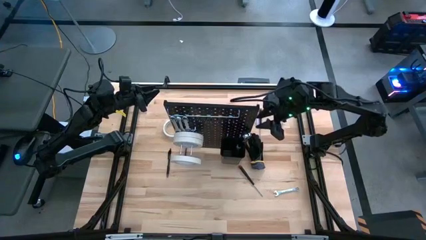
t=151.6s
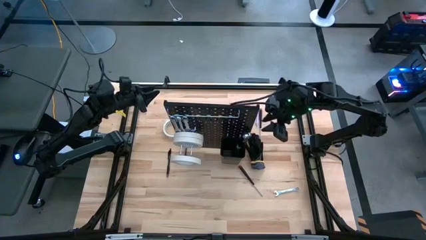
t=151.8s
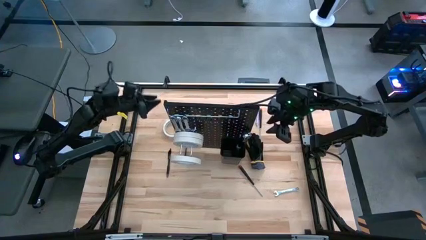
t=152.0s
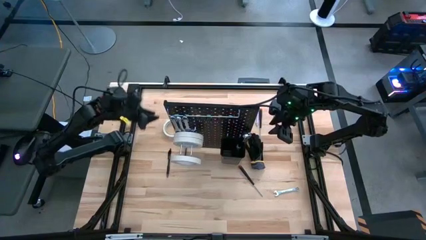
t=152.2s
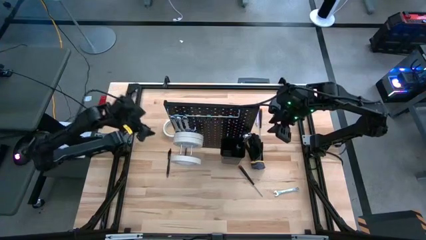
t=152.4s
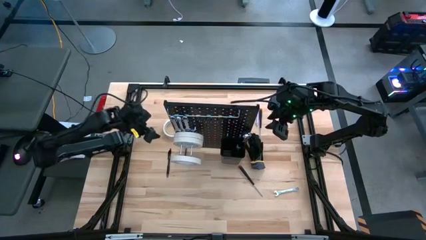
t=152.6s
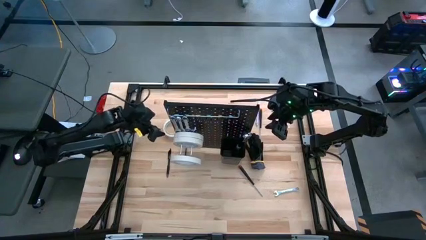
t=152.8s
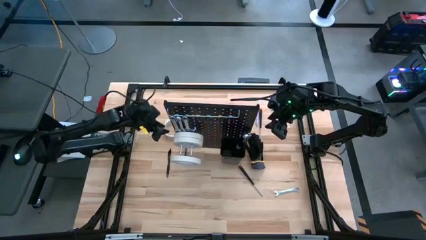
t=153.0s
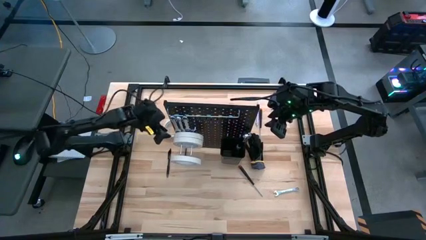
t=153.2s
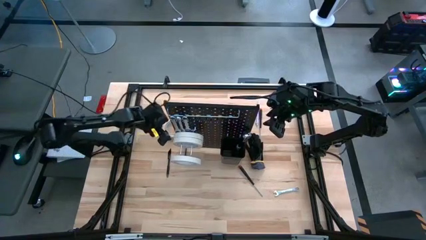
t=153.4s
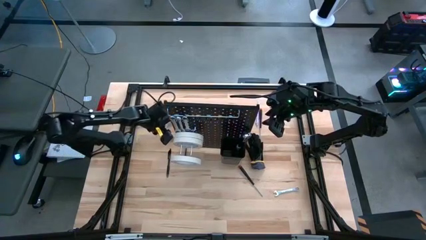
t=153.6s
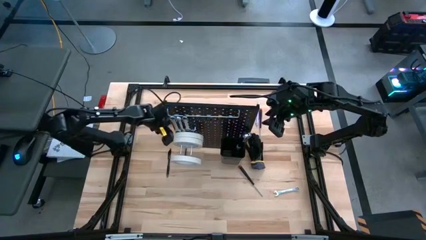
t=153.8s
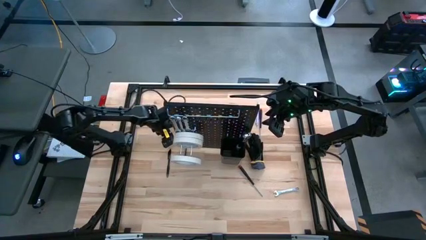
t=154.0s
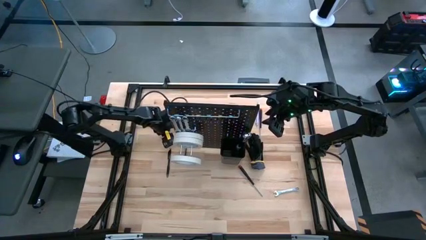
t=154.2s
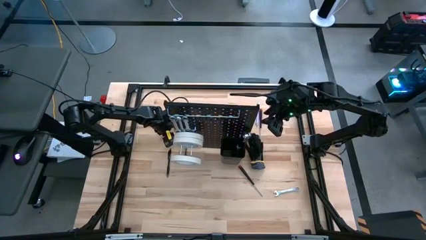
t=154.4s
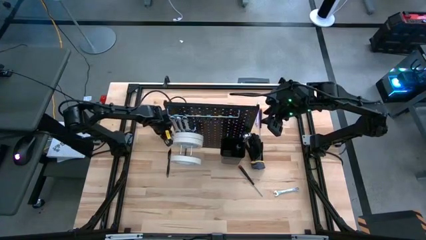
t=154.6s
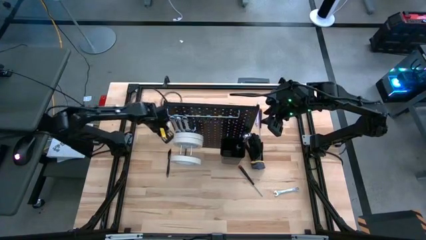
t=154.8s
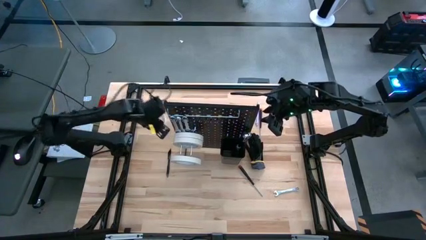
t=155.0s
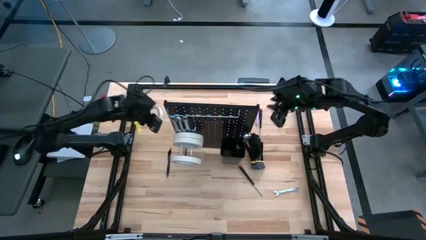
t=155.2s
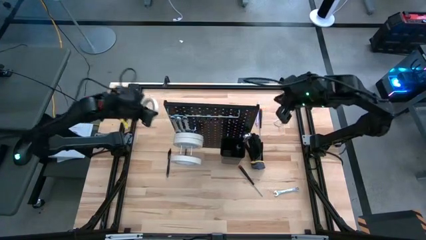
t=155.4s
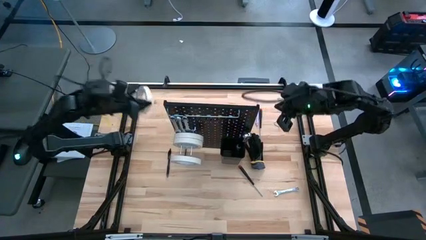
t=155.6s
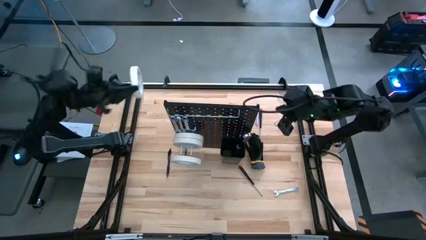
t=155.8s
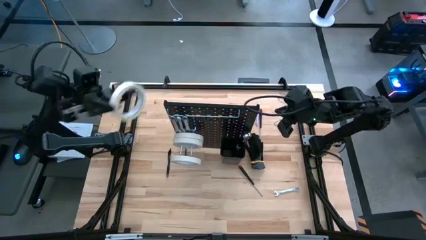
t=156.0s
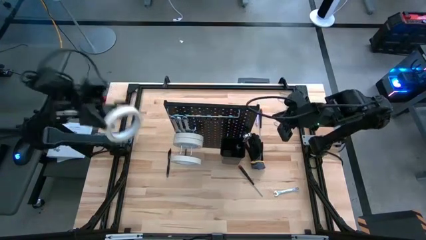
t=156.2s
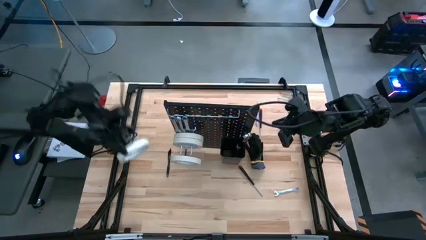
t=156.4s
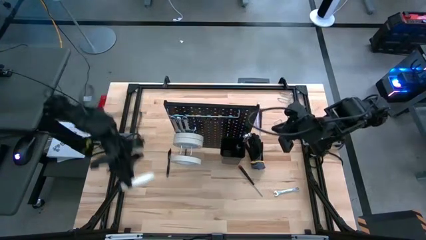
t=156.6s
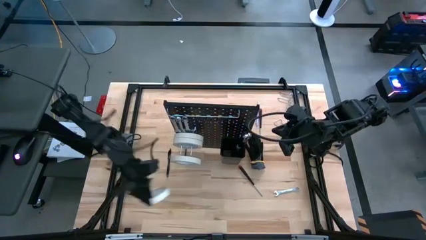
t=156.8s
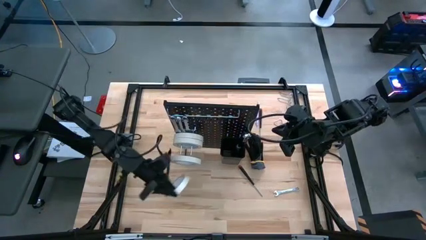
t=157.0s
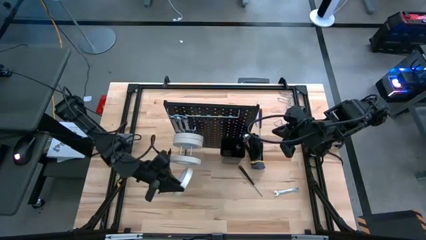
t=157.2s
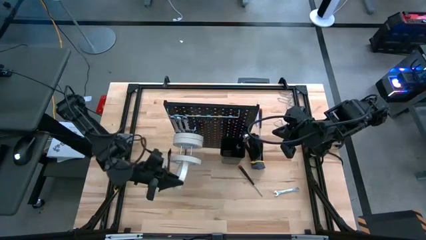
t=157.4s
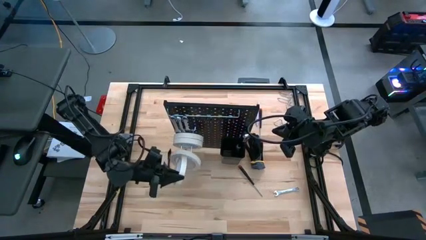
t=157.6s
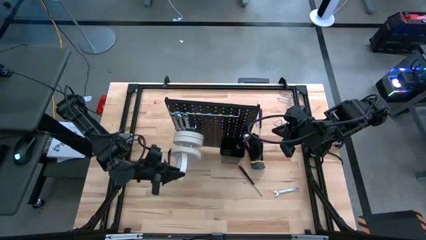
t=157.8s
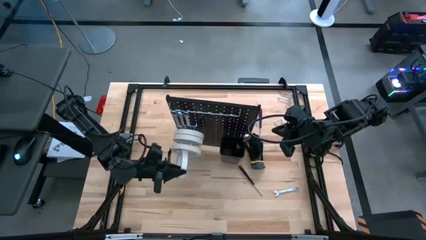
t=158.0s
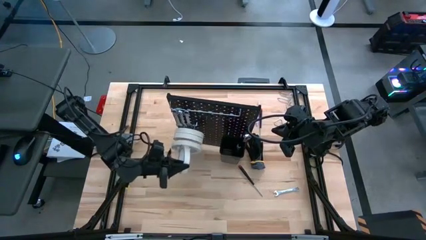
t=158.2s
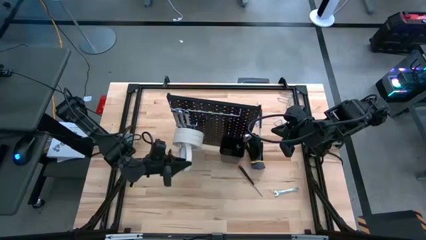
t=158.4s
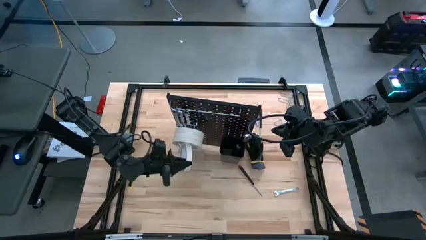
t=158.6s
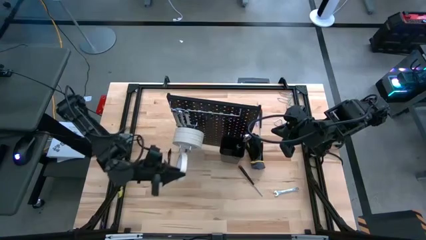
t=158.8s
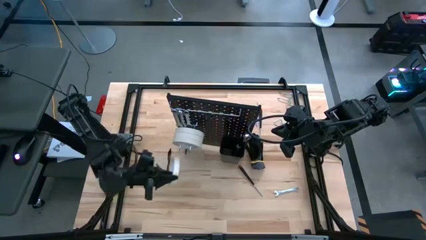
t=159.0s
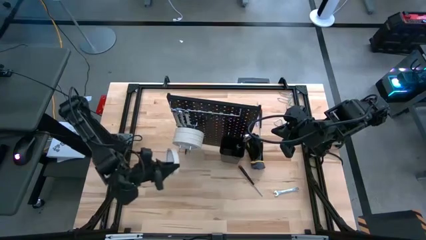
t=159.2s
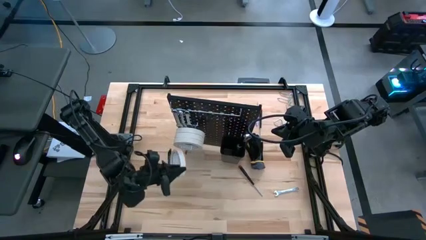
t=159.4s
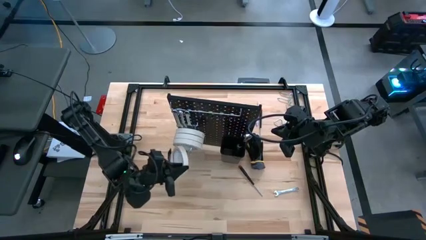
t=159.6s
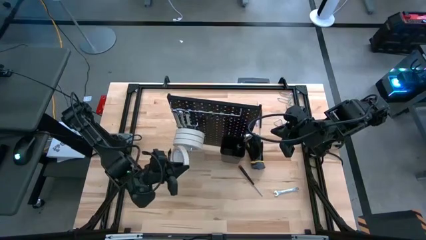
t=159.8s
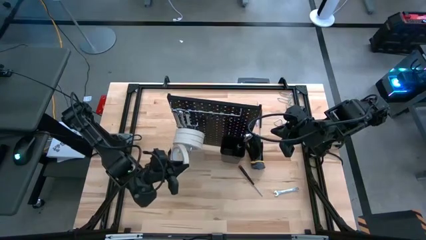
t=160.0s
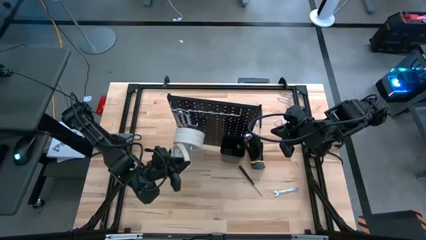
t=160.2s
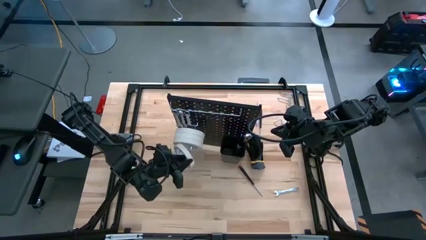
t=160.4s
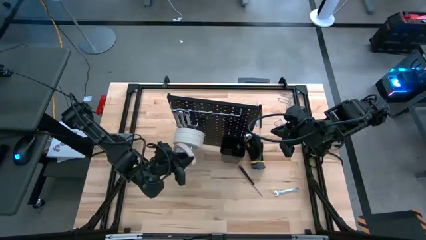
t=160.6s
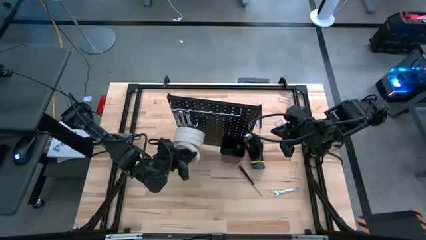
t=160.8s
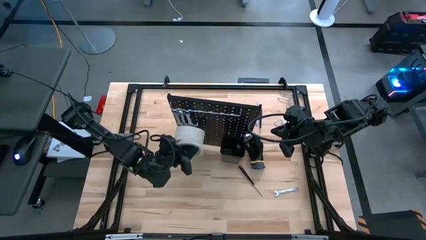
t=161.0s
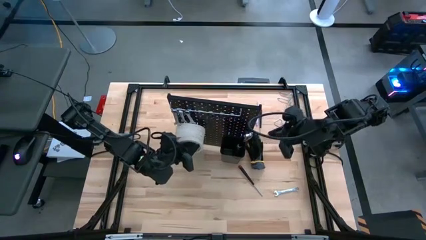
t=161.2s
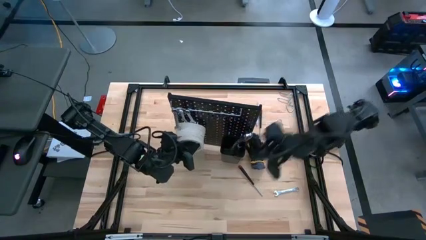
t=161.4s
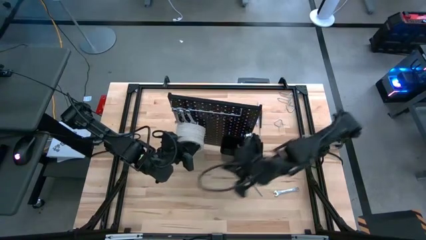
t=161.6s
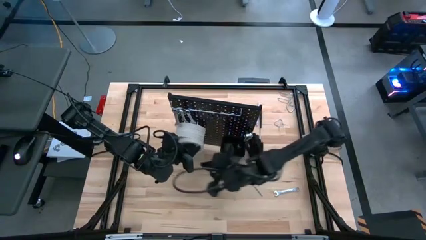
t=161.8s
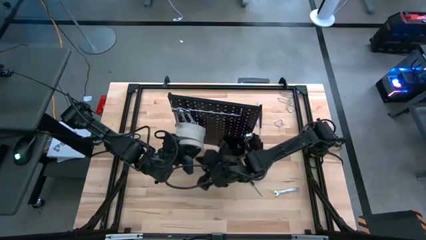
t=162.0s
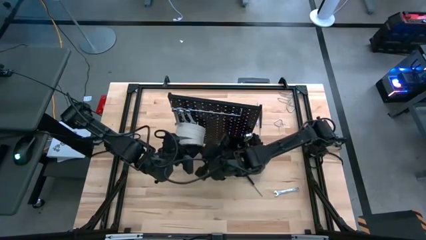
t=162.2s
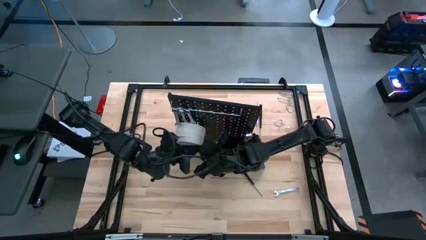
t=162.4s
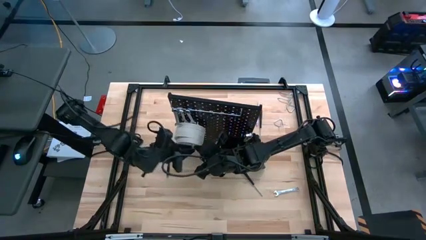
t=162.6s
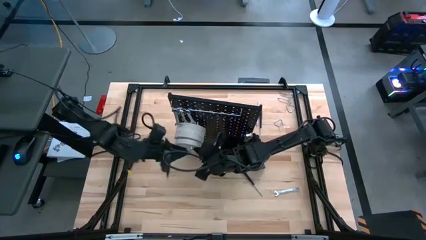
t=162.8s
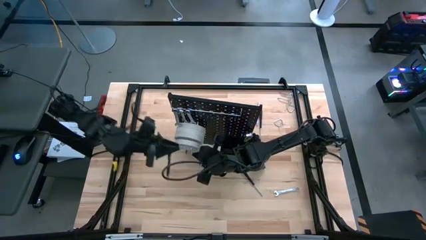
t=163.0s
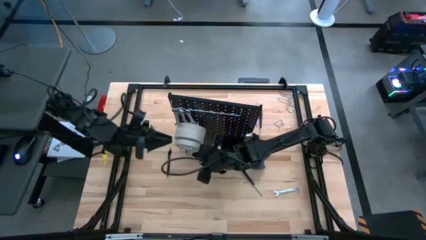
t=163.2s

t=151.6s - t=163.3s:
Task: Hang tools onto peg board
Hang the masking tape onto the pegboard

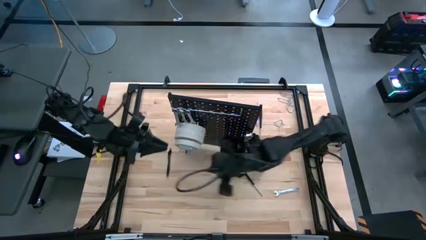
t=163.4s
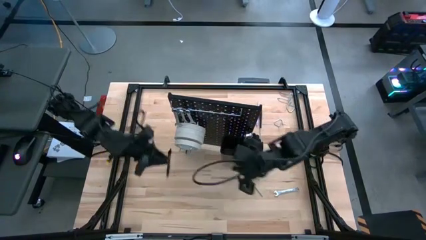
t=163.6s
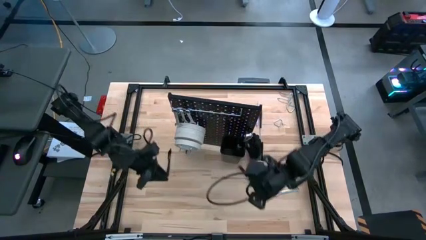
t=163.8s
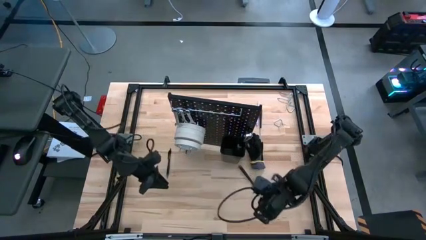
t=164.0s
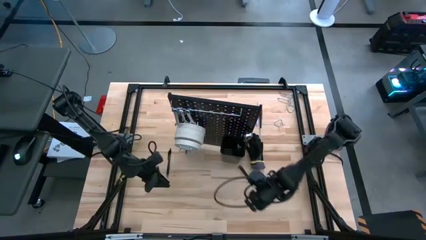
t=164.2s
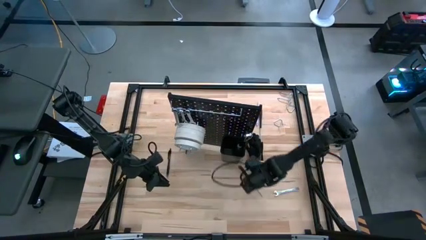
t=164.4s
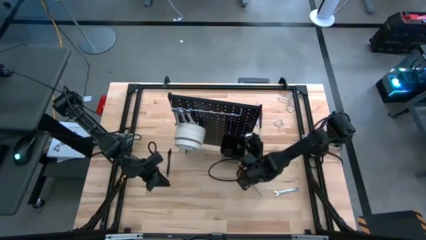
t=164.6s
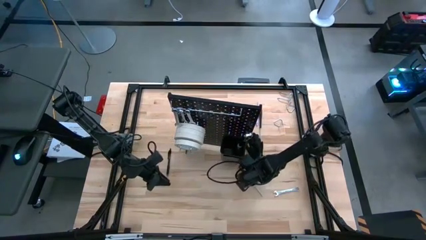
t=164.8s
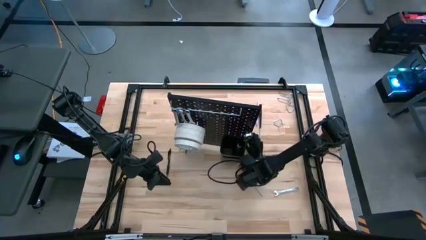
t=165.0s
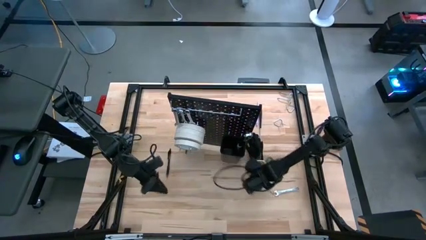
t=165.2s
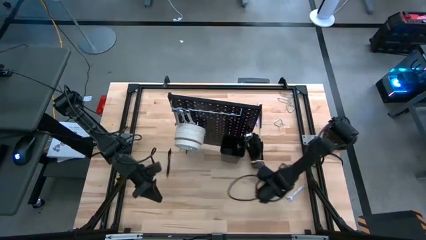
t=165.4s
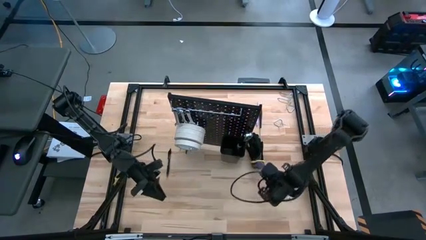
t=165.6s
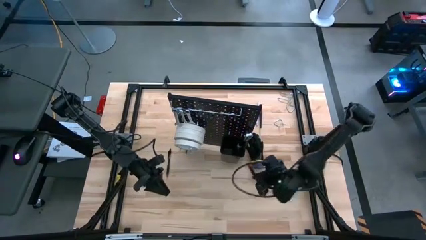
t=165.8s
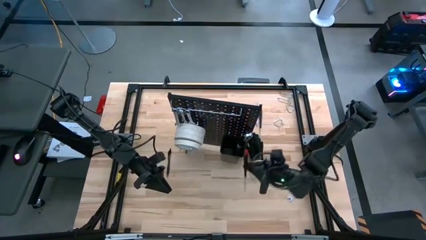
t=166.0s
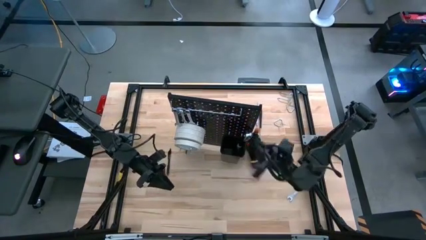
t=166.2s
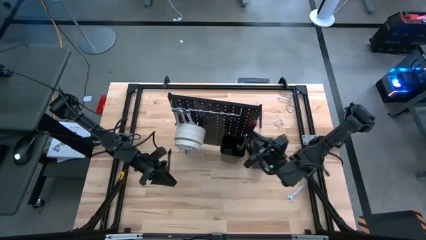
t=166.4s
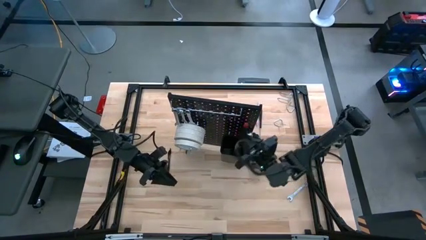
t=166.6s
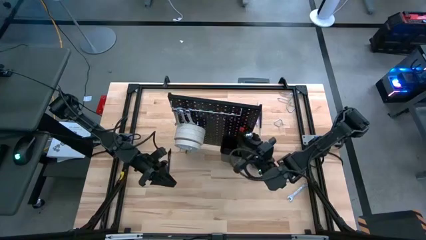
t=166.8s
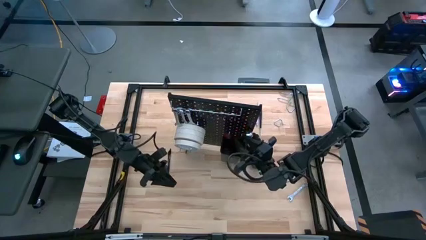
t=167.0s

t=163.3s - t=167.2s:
Hang the screw tool onto the pegboard
